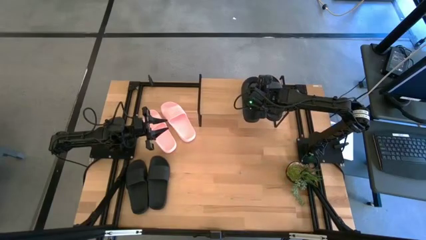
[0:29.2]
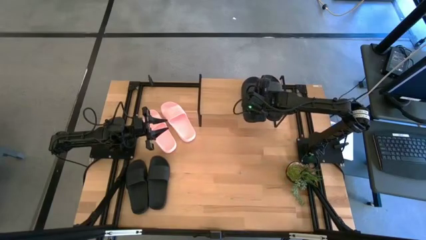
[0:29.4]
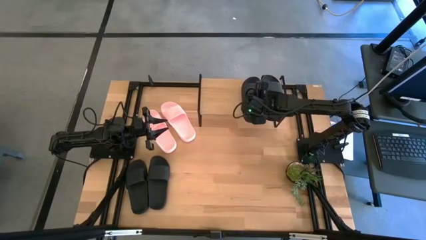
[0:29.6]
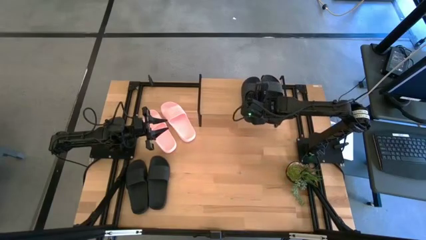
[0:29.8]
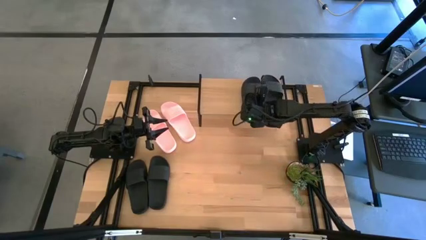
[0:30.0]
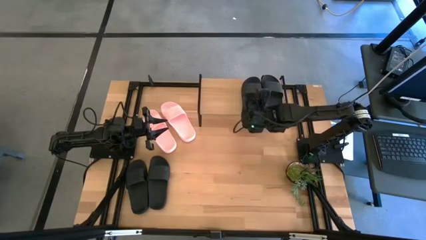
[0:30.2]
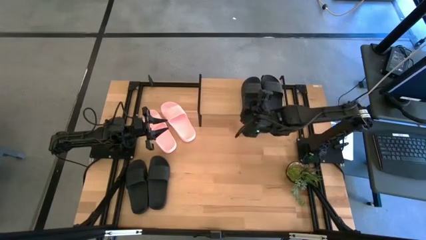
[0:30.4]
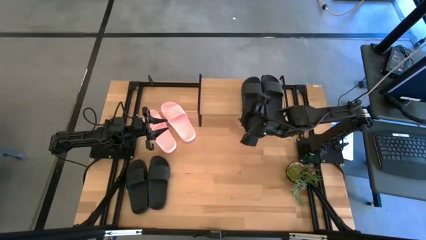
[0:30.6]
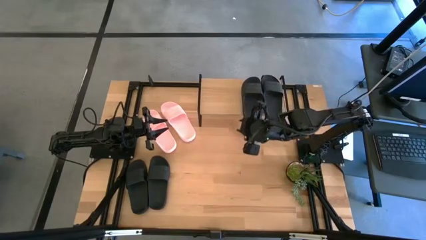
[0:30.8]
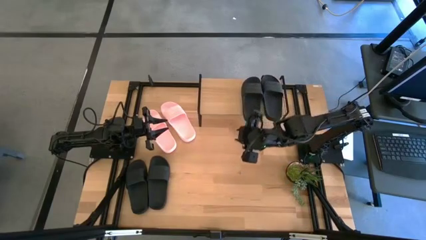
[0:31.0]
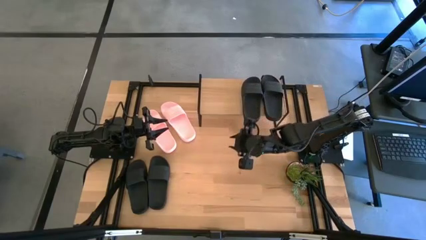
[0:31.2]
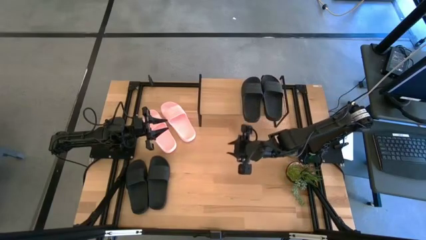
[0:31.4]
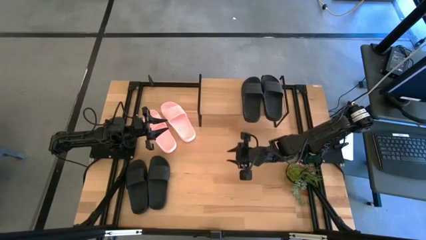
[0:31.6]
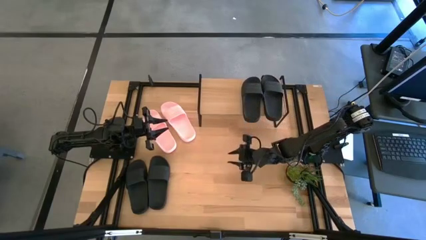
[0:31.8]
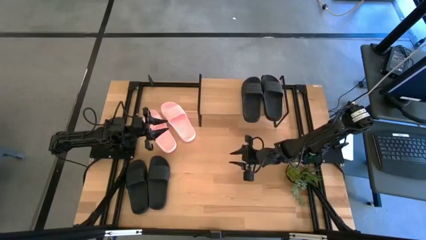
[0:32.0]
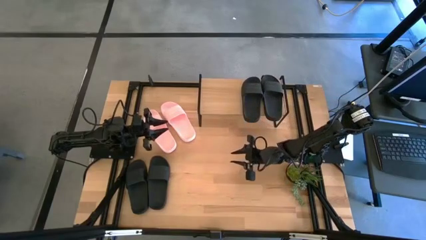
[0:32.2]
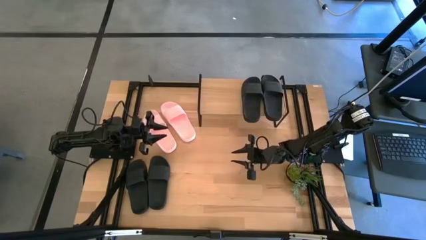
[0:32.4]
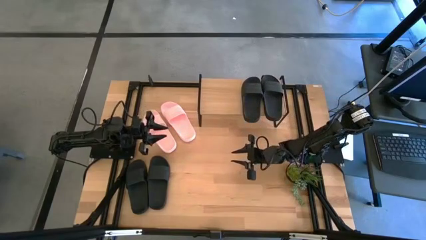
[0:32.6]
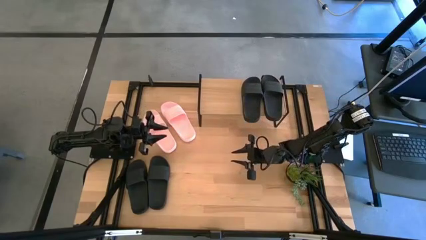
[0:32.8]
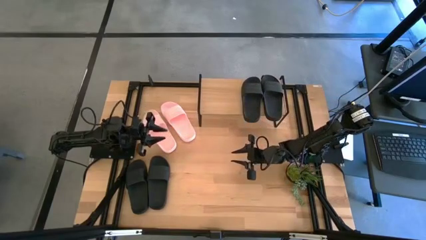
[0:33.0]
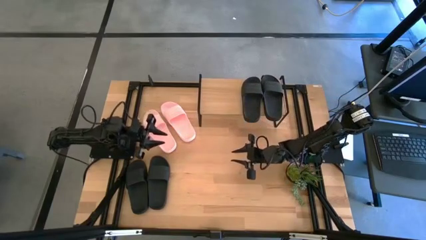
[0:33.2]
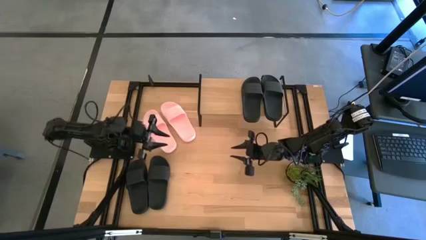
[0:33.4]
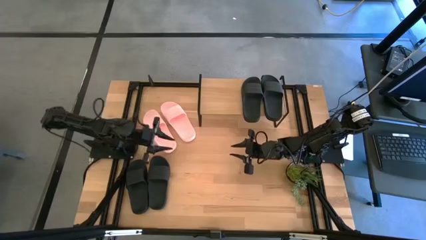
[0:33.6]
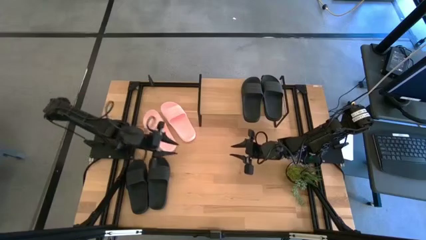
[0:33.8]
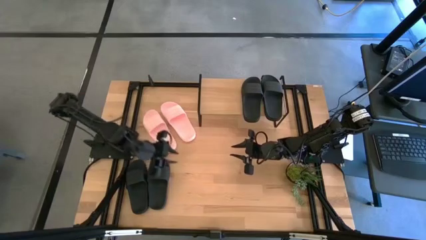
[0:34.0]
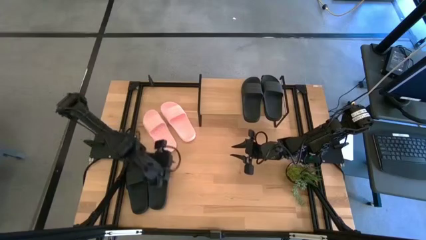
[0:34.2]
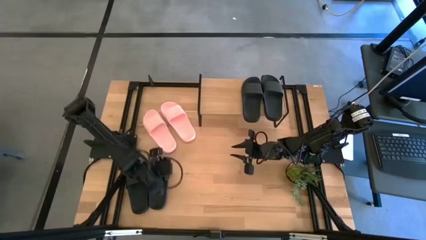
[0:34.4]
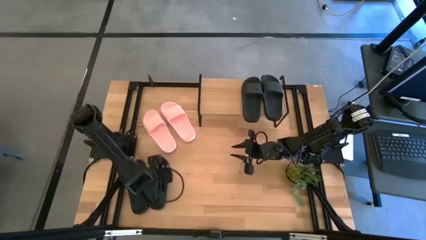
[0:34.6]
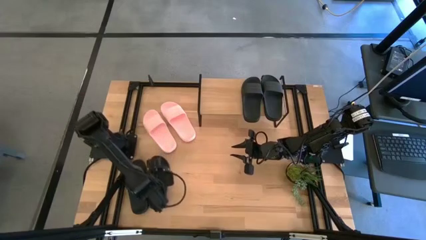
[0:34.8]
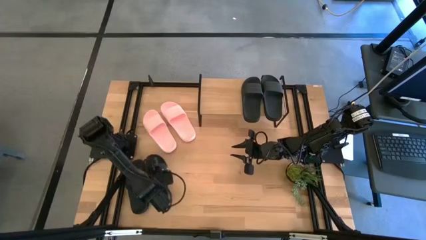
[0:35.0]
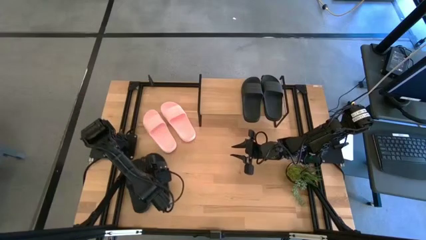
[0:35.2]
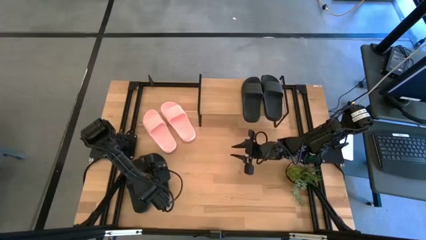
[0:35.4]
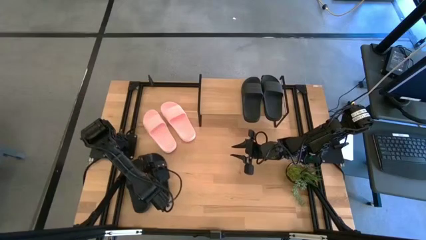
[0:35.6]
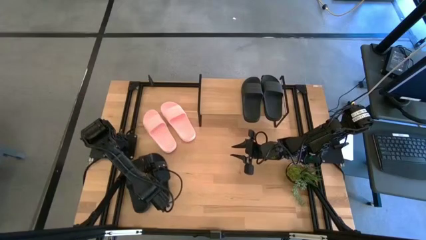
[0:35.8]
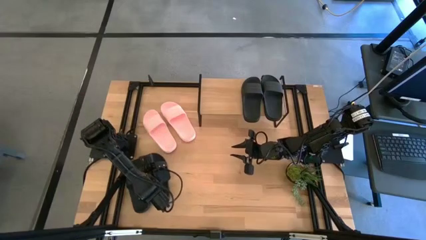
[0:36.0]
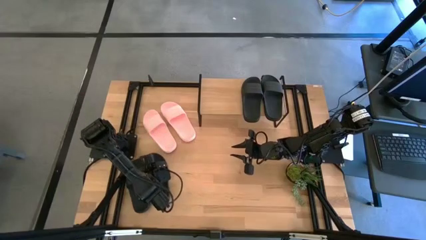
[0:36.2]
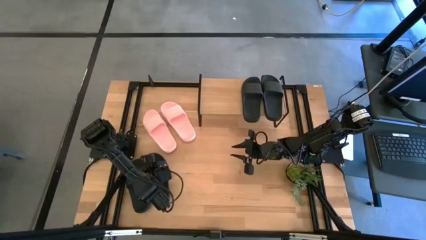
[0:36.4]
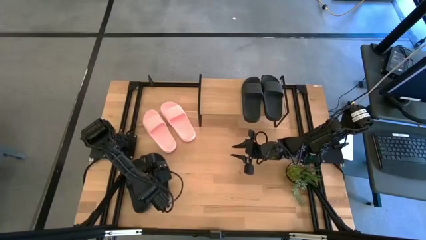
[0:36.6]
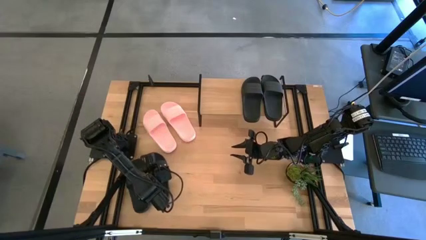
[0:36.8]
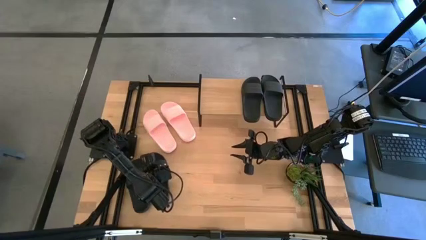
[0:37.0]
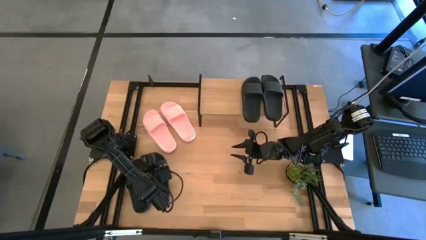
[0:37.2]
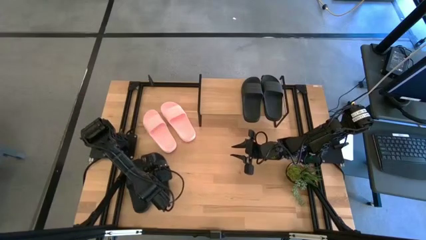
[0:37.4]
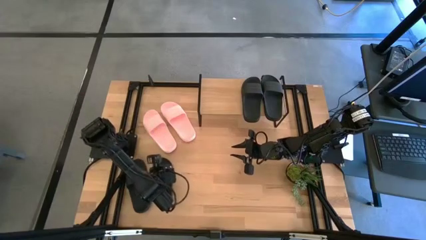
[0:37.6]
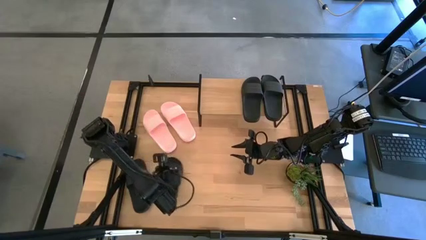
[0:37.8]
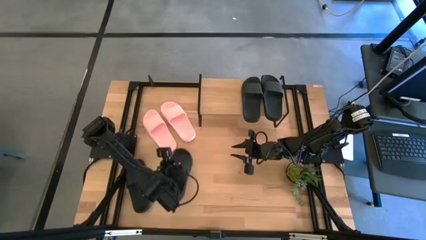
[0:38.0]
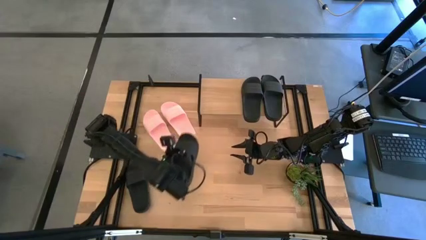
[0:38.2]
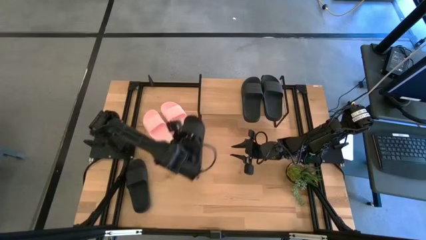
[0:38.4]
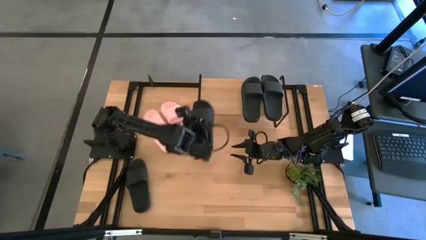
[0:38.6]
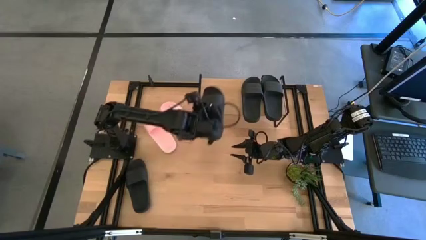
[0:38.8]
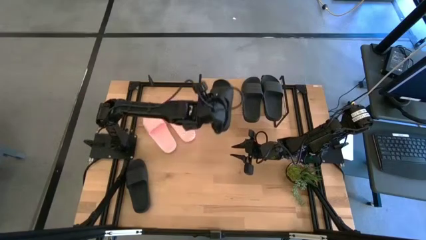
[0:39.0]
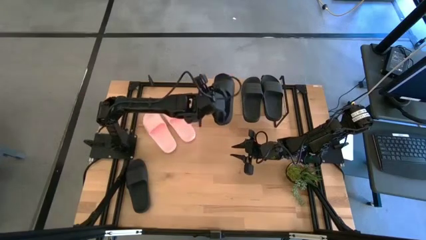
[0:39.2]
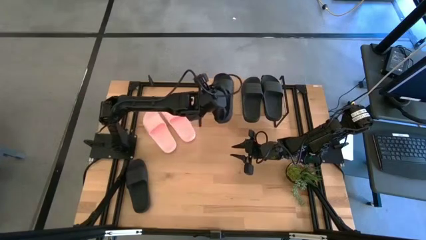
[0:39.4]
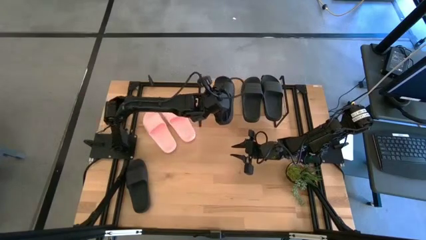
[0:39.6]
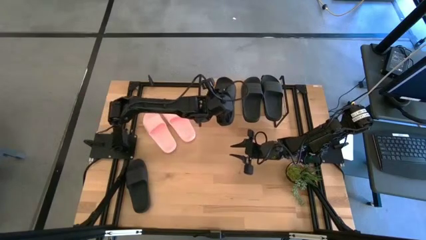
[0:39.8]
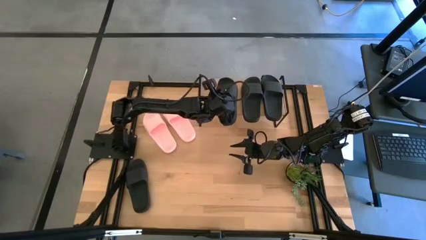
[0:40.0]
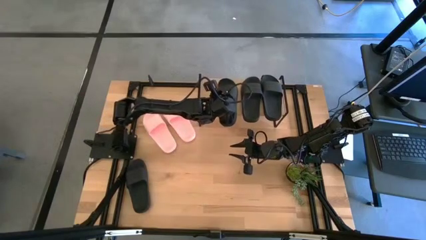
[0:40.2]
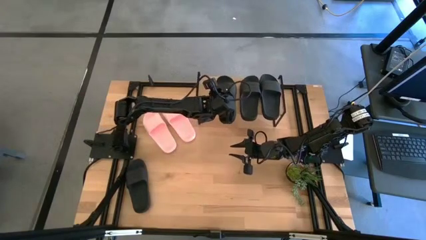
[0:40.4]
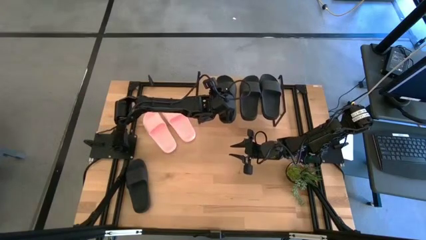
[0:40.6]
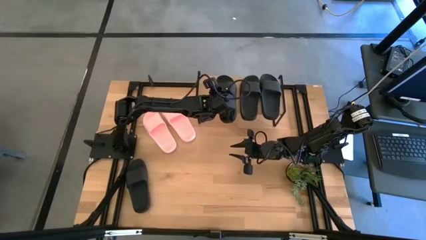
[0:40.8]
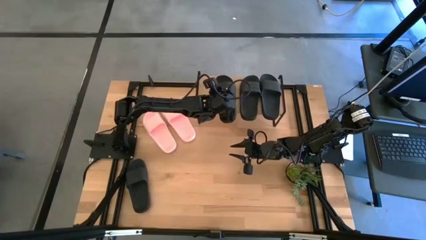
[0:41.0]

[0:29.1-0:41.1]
Task: Pick and place slides into the shelf
Put the black slide on the shelf
